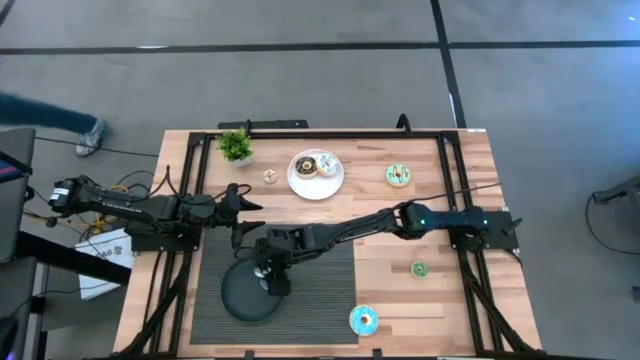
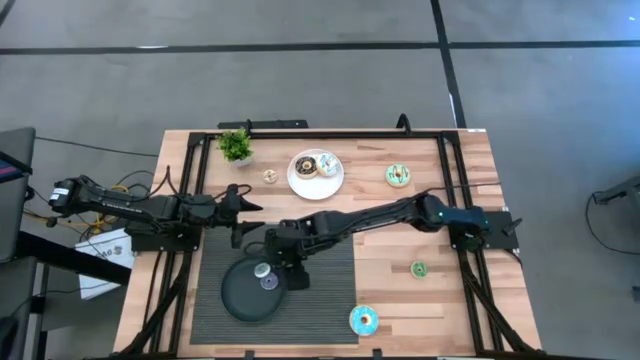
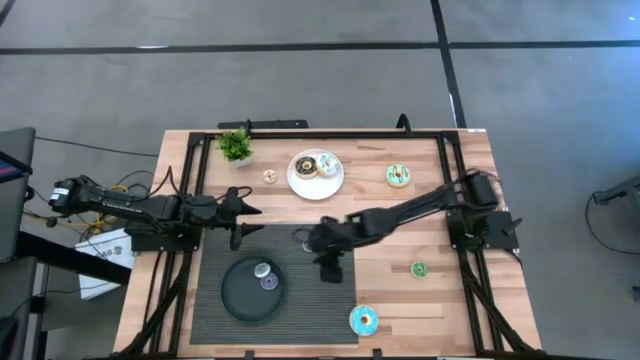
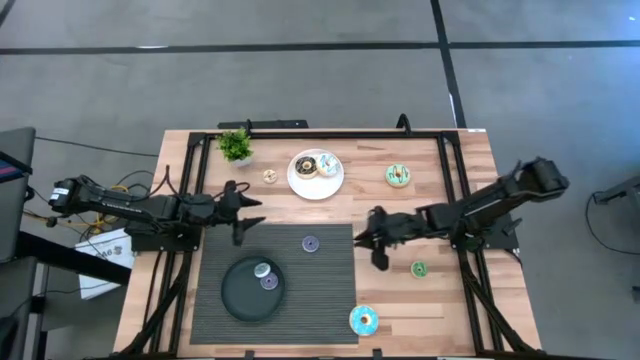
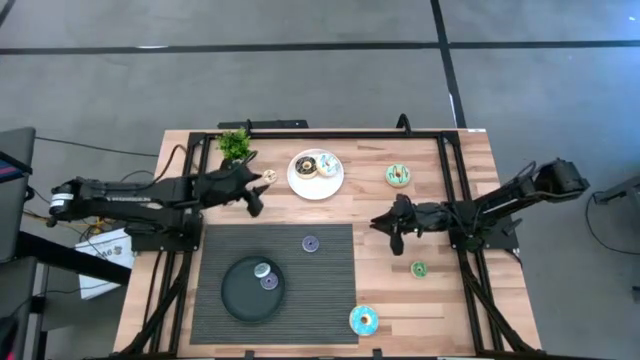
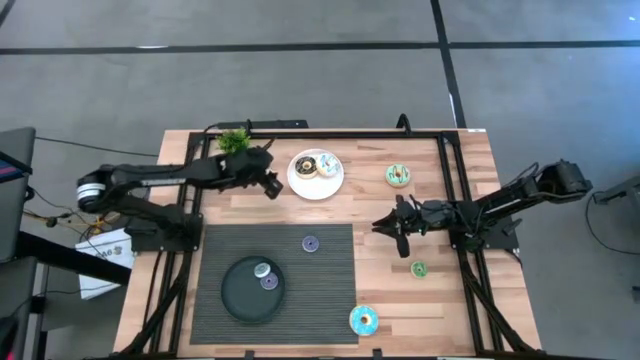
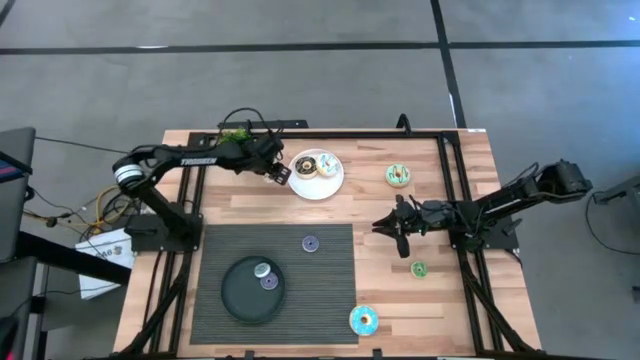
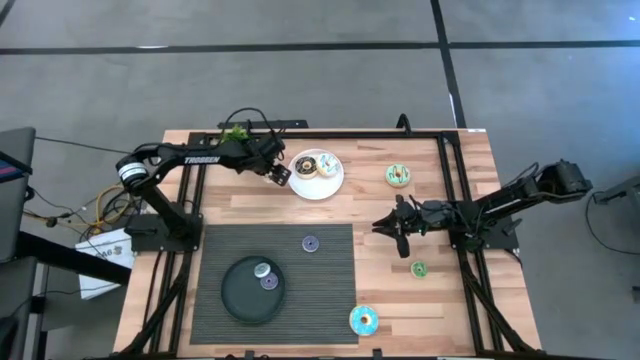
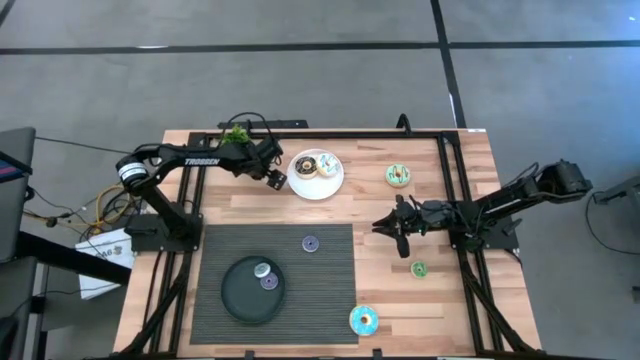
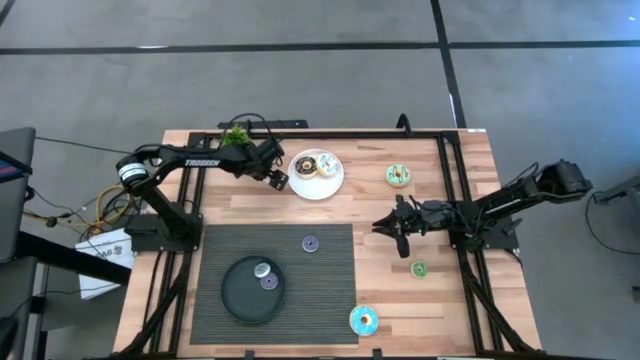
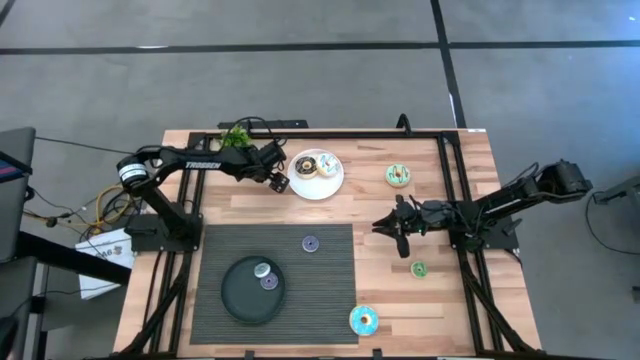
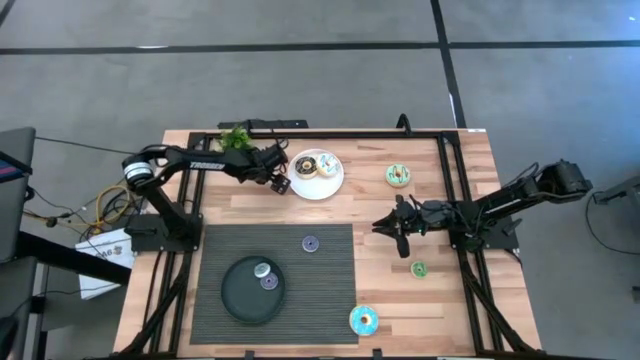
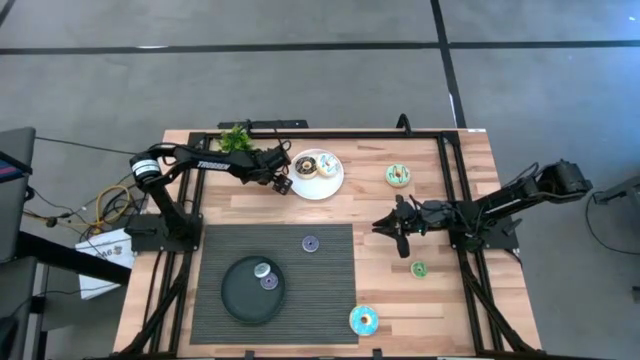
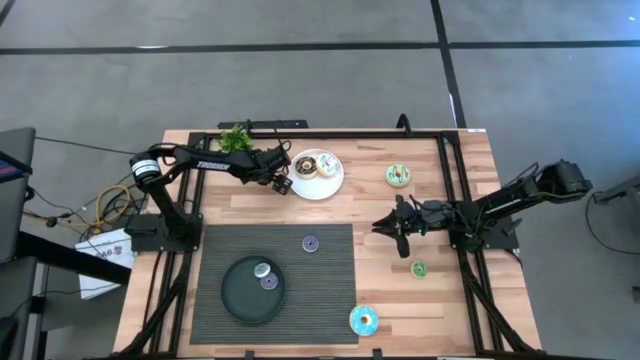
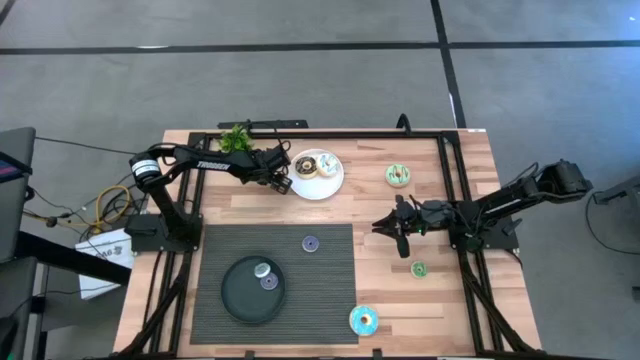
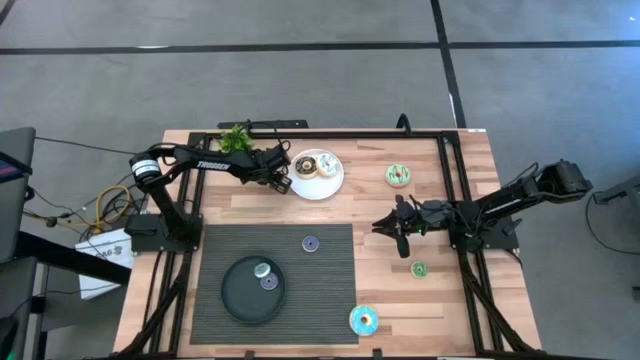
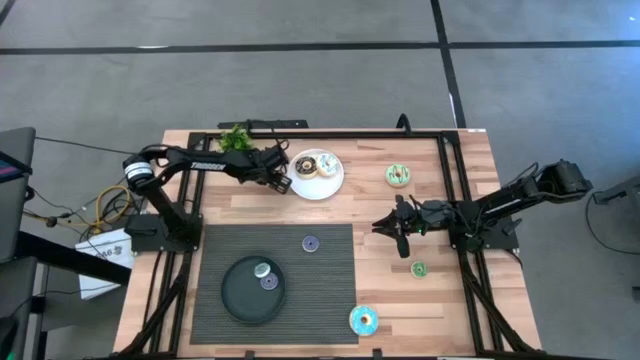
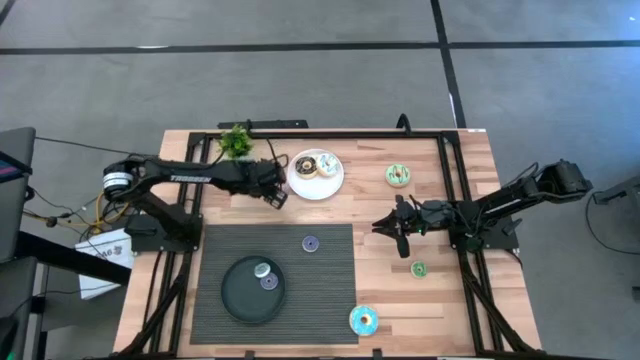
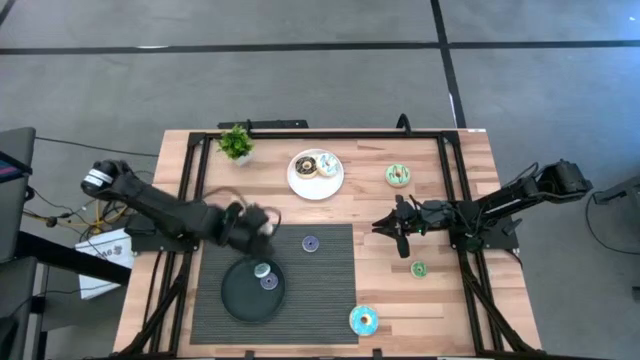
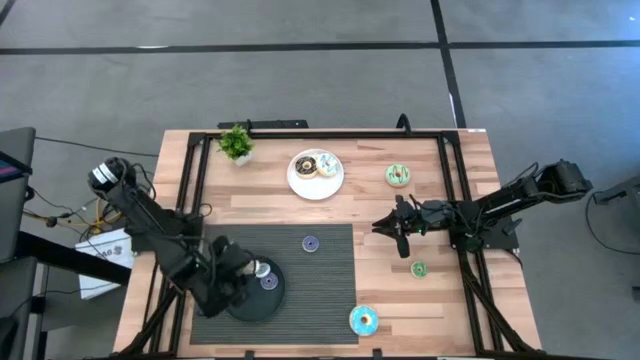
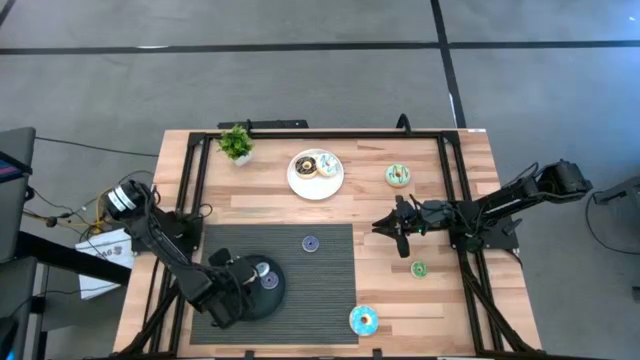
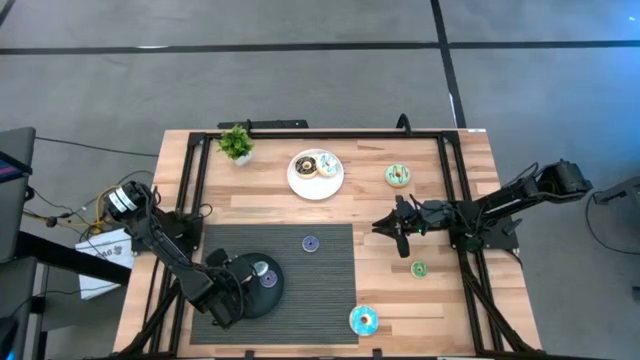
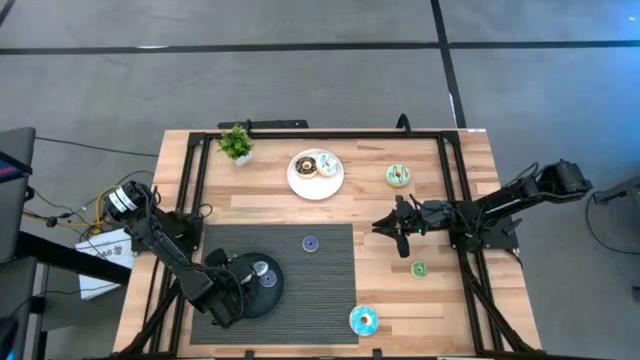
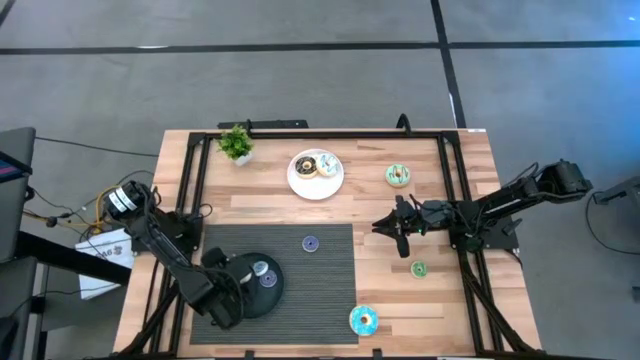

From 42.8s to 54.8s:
Task: Pick & Place donuts
Put the small white donut on the black plate

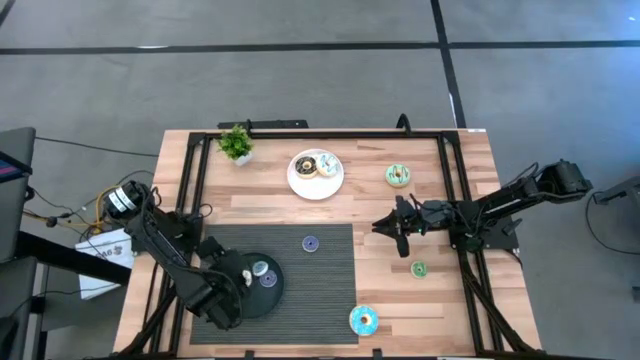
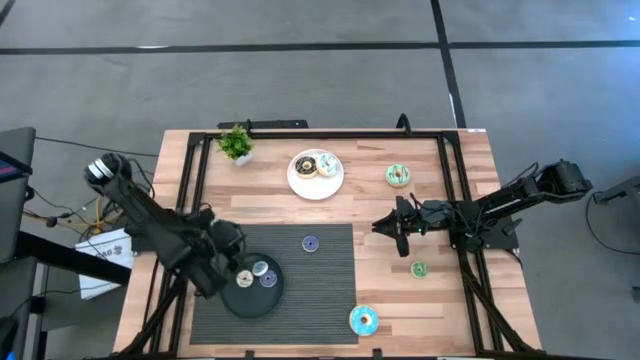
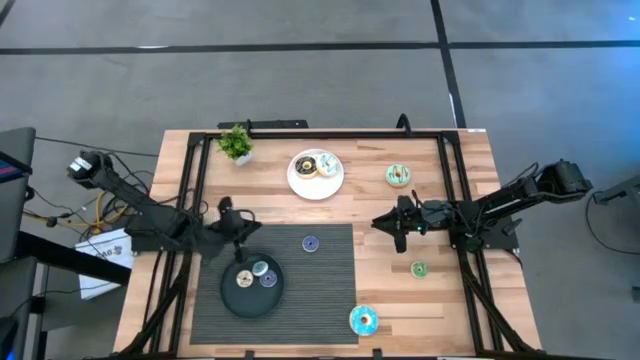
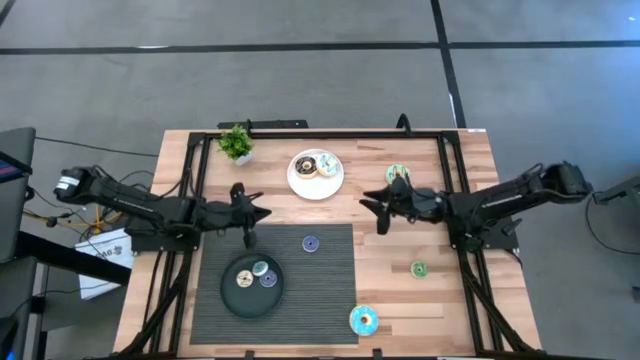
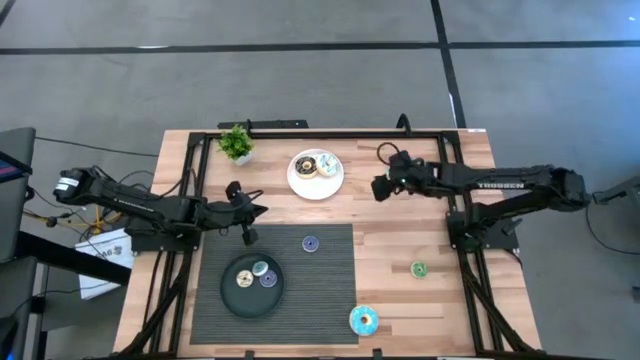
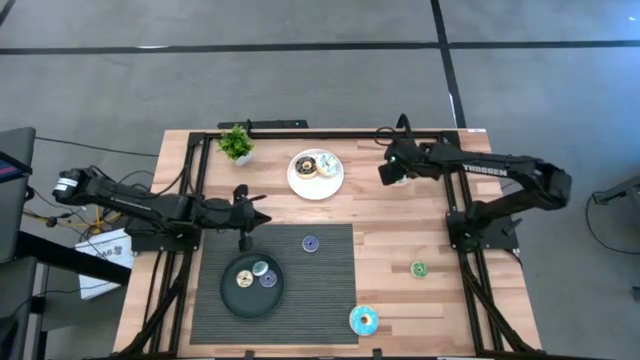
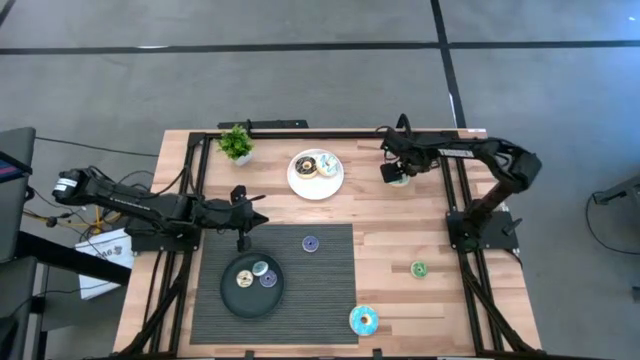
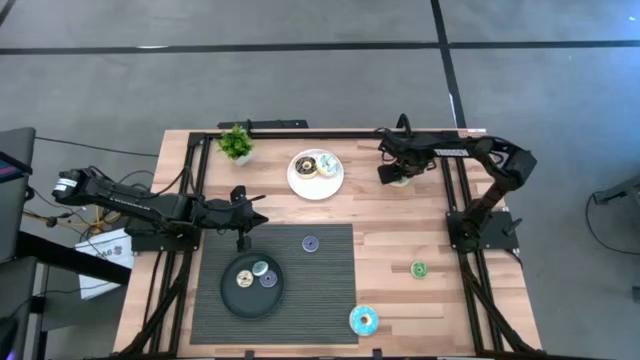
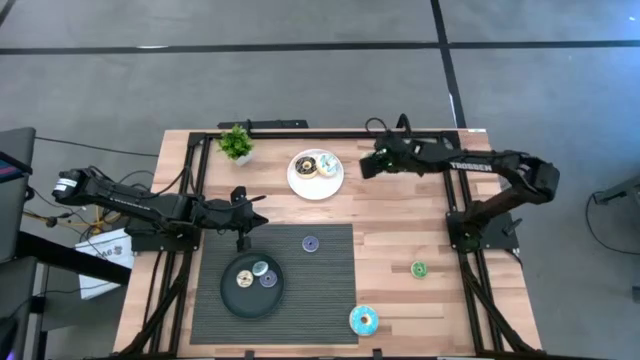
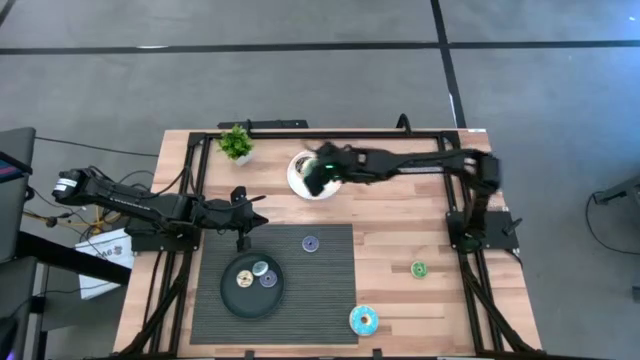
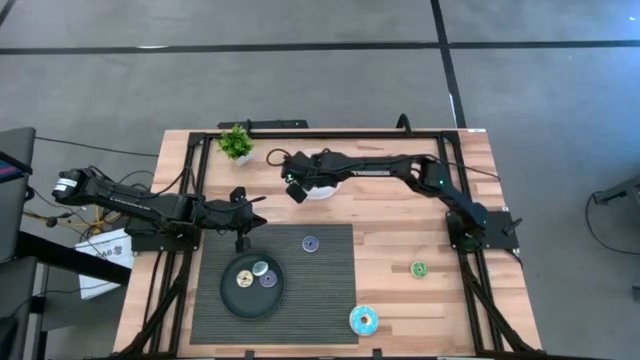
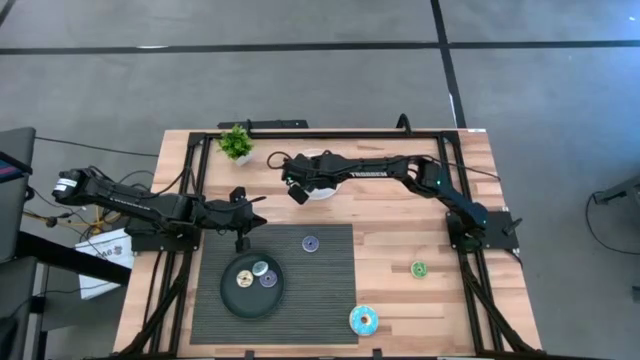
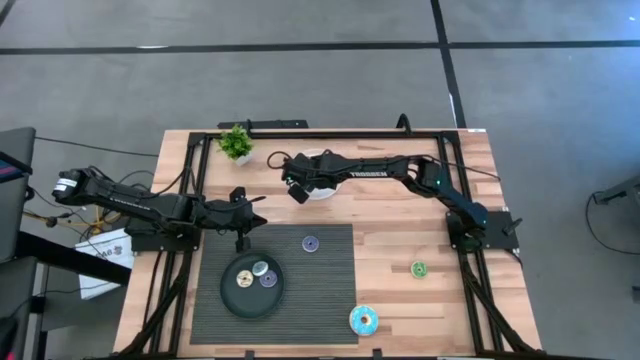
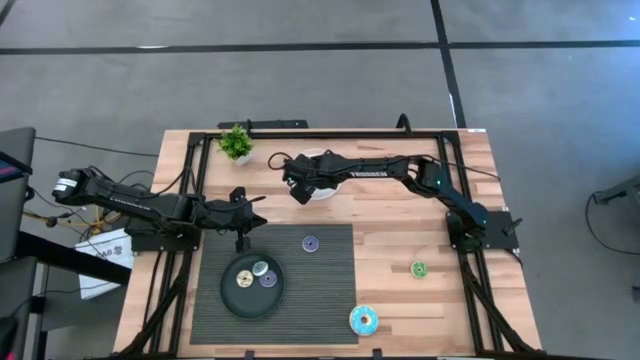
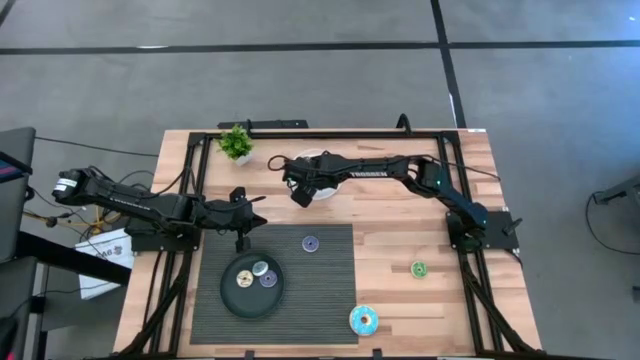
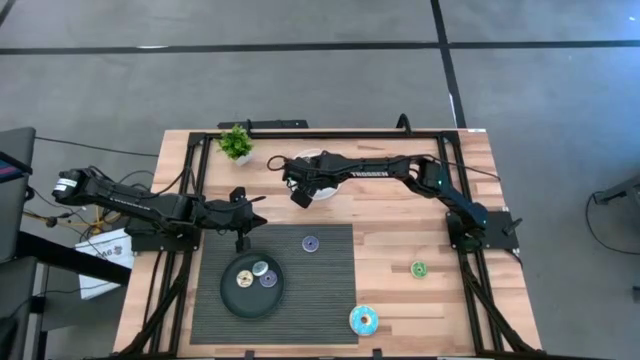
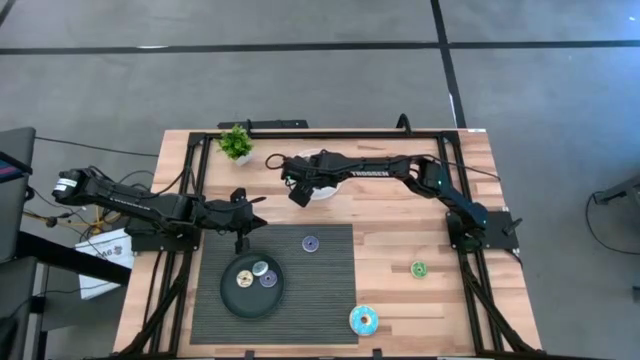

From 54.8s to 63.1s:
Put the large light blue donut on the white plate

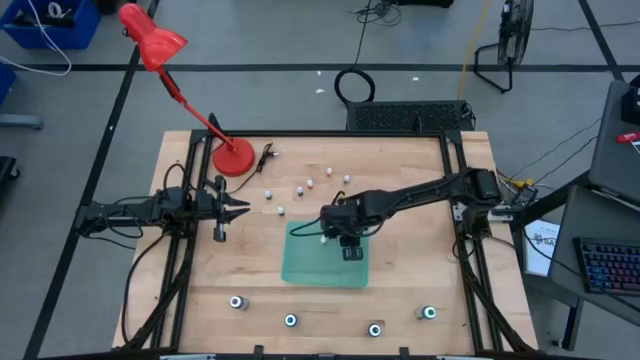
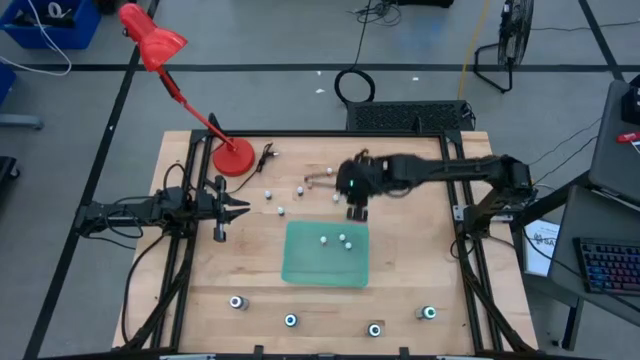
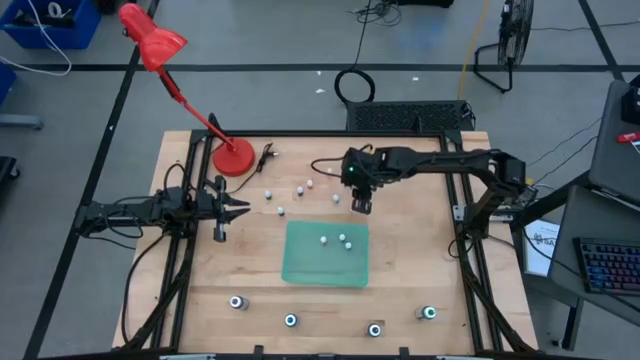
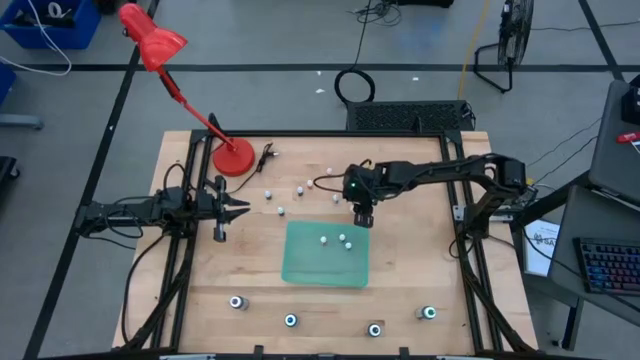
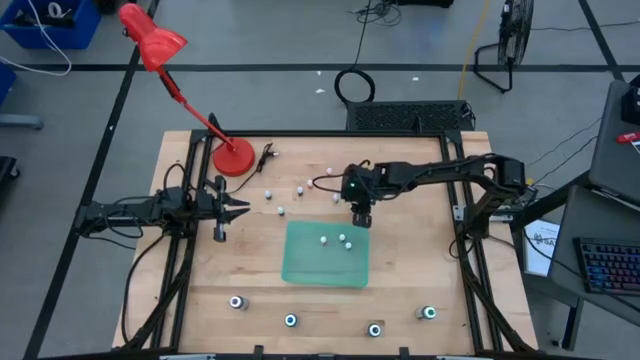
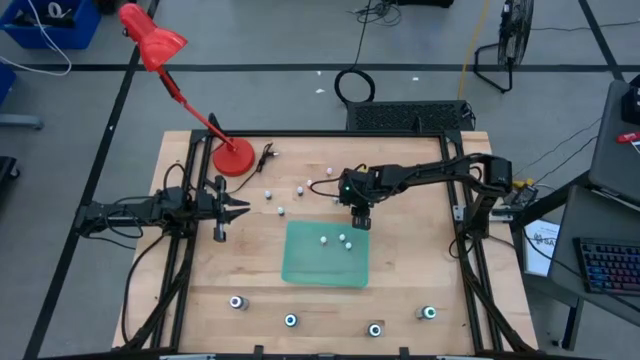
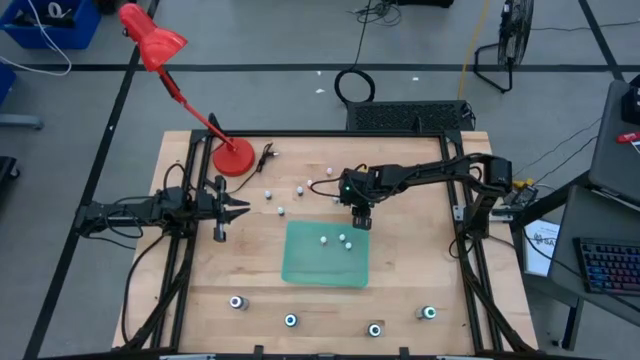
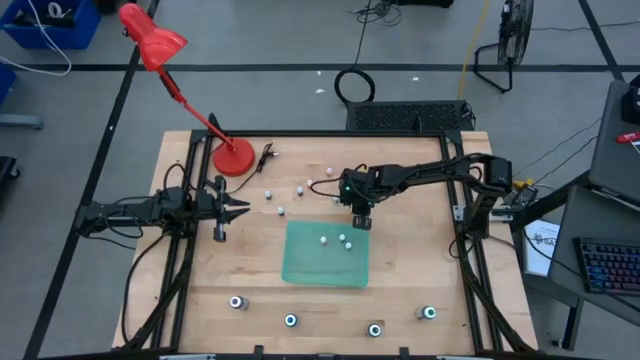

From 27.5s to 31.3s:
Task: Pick & Place food coloring
Put the small orange food coloring bottle into the green bin
